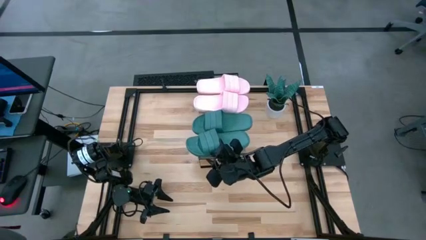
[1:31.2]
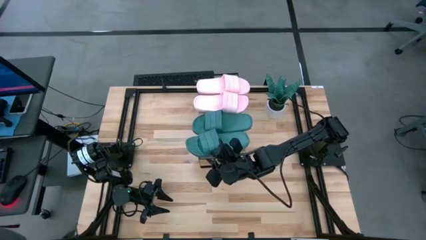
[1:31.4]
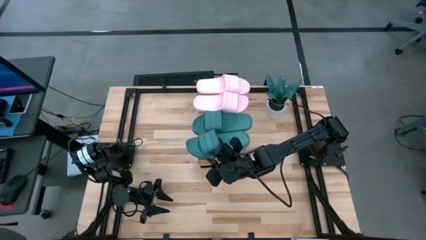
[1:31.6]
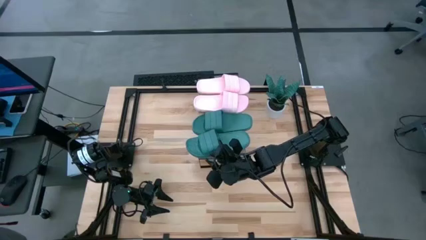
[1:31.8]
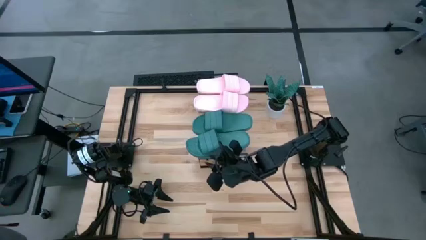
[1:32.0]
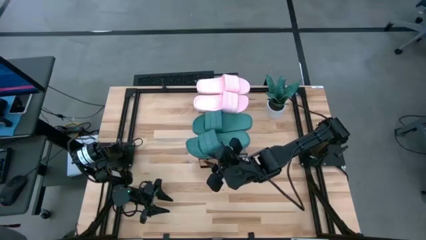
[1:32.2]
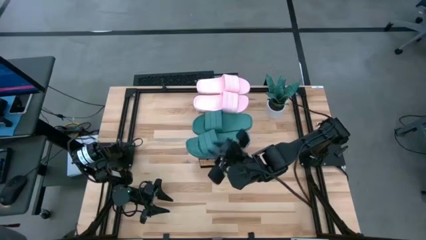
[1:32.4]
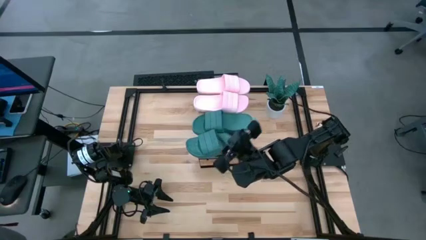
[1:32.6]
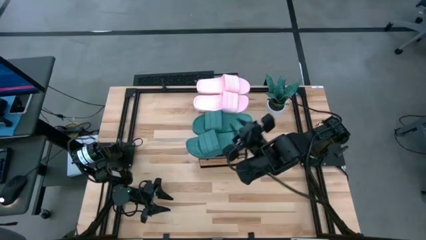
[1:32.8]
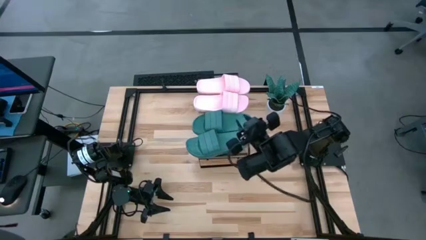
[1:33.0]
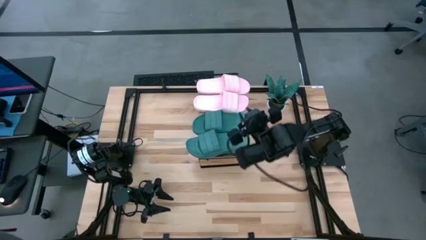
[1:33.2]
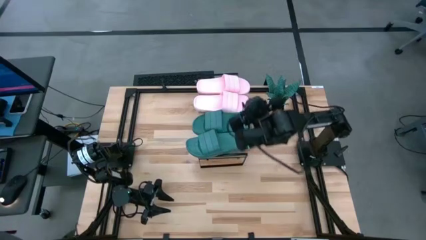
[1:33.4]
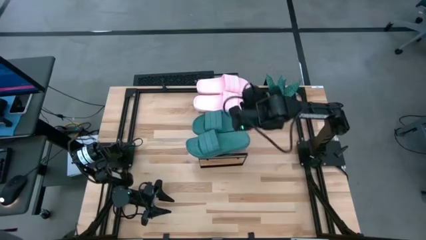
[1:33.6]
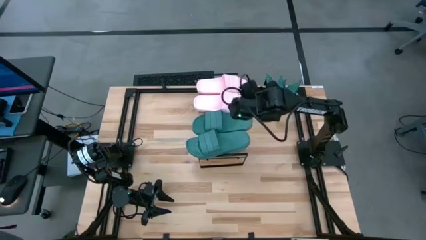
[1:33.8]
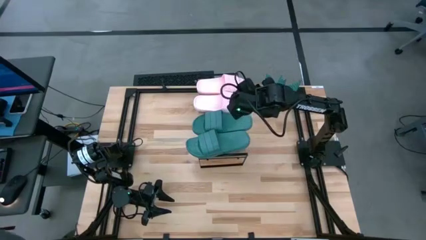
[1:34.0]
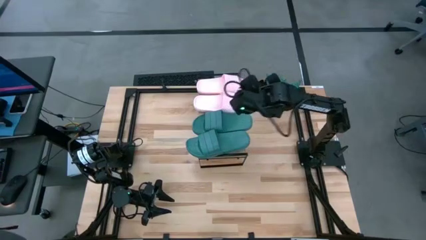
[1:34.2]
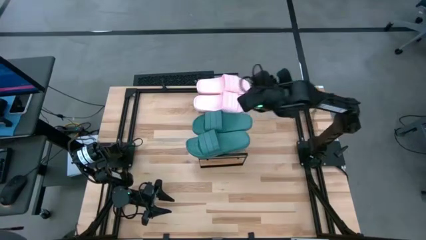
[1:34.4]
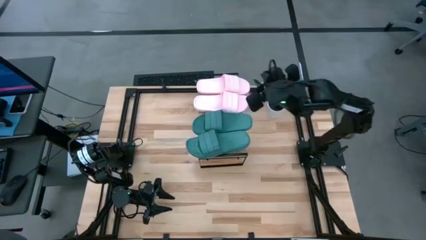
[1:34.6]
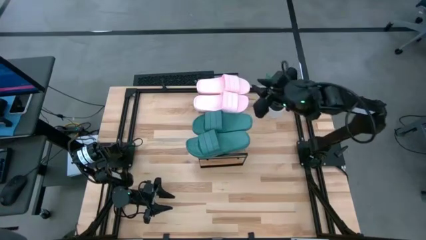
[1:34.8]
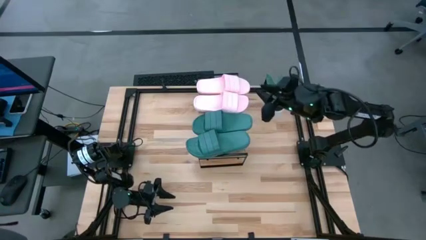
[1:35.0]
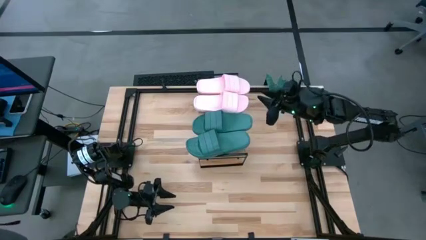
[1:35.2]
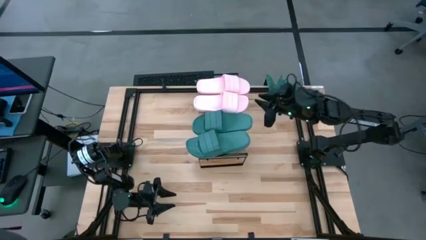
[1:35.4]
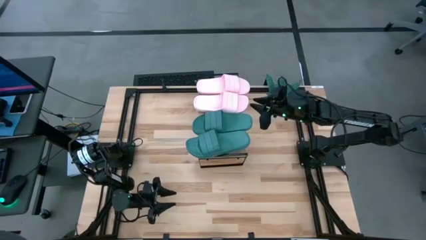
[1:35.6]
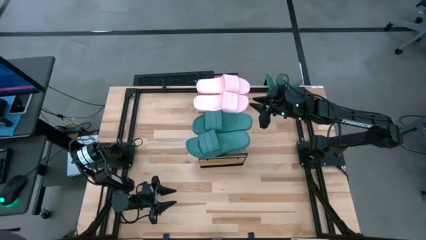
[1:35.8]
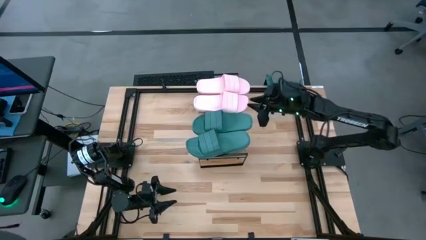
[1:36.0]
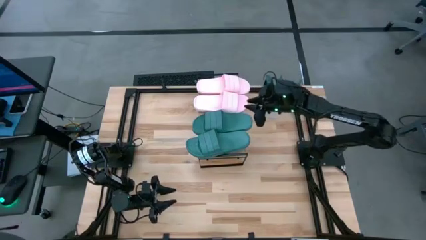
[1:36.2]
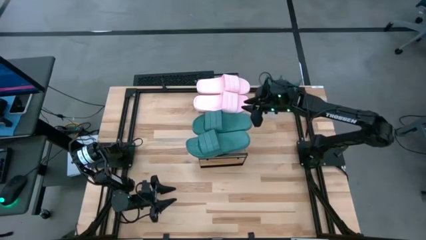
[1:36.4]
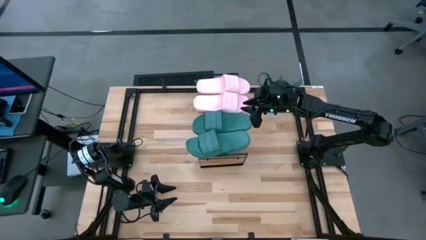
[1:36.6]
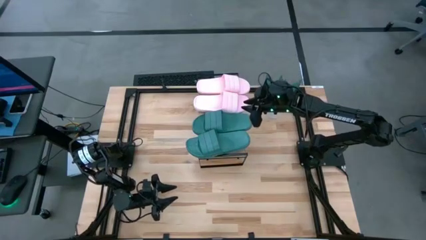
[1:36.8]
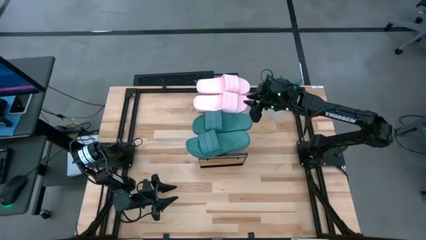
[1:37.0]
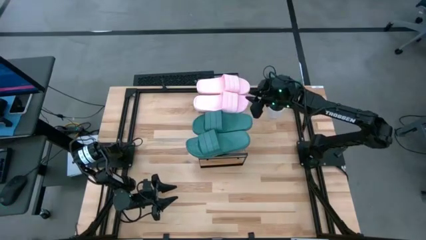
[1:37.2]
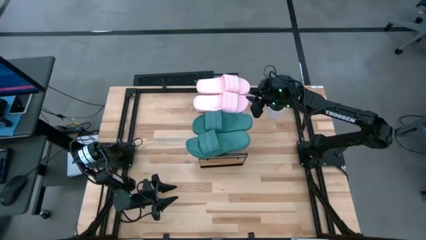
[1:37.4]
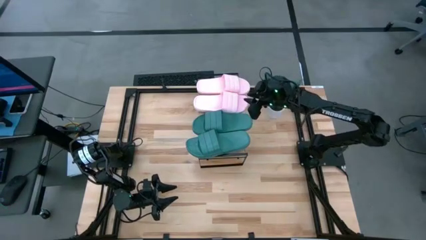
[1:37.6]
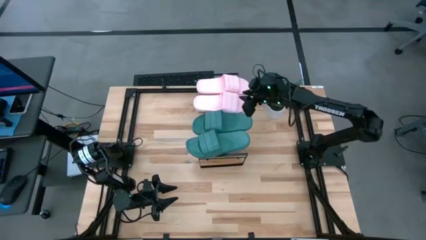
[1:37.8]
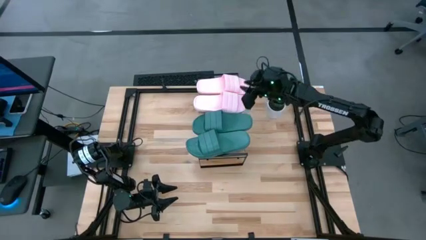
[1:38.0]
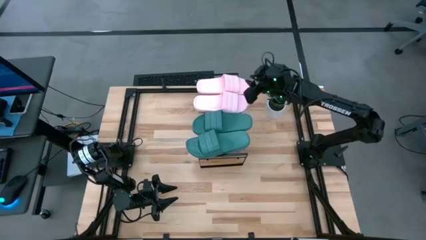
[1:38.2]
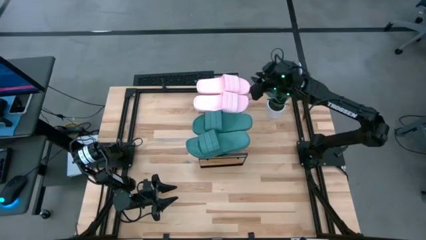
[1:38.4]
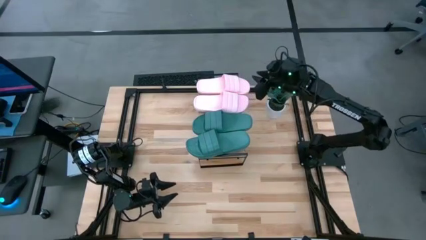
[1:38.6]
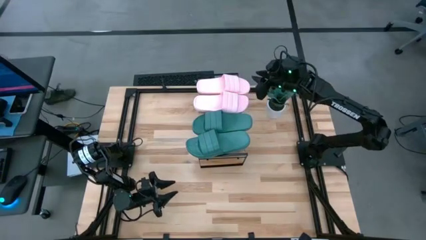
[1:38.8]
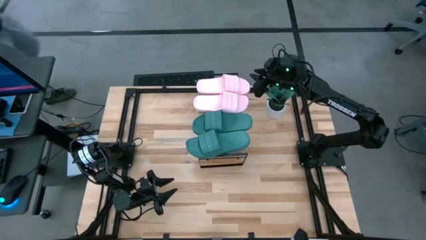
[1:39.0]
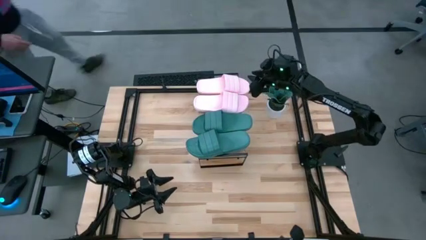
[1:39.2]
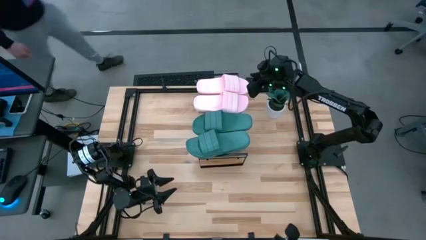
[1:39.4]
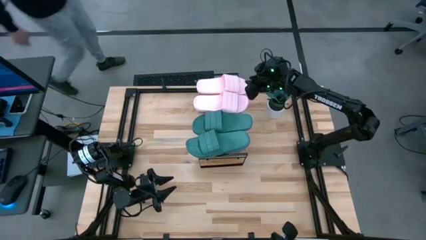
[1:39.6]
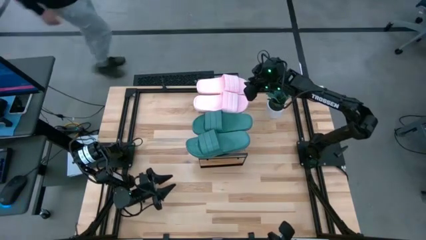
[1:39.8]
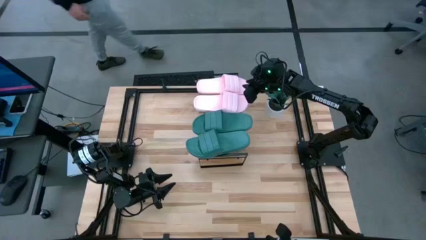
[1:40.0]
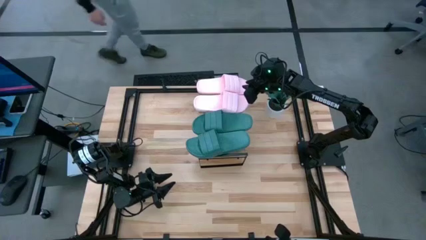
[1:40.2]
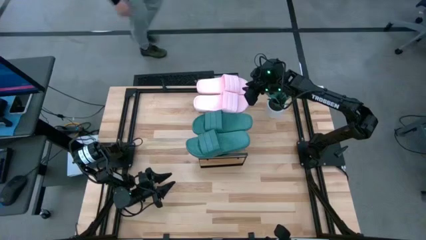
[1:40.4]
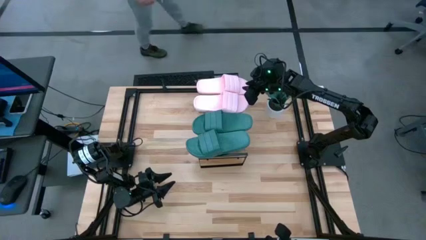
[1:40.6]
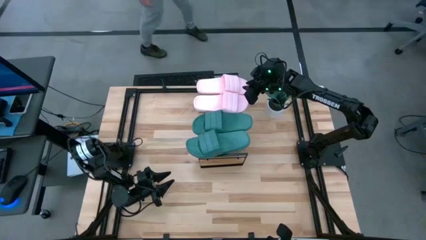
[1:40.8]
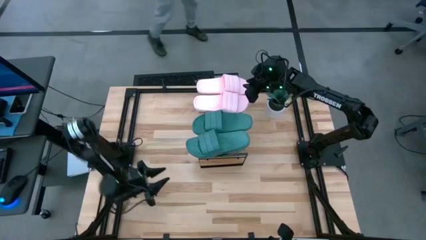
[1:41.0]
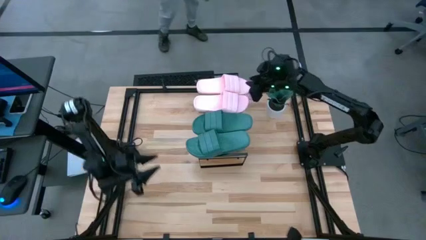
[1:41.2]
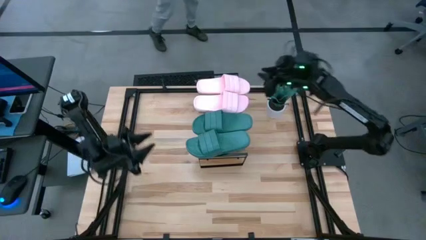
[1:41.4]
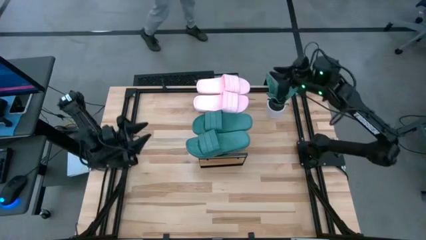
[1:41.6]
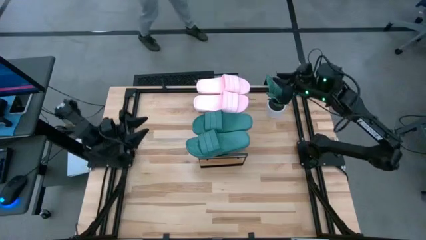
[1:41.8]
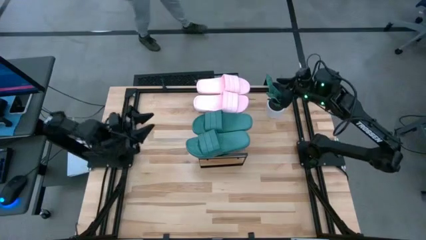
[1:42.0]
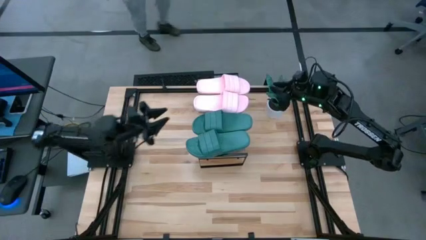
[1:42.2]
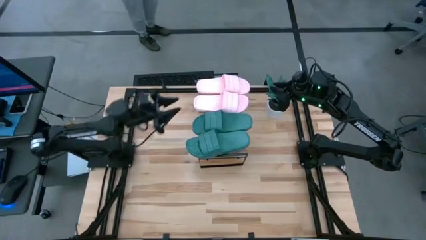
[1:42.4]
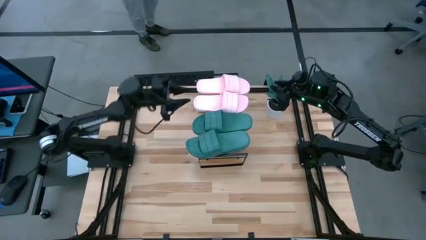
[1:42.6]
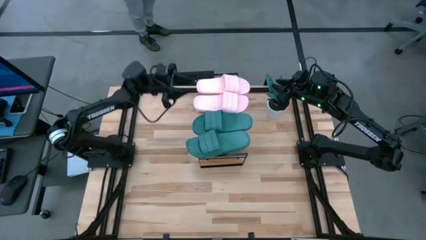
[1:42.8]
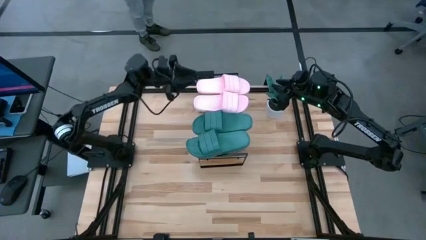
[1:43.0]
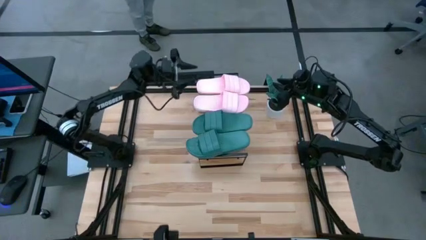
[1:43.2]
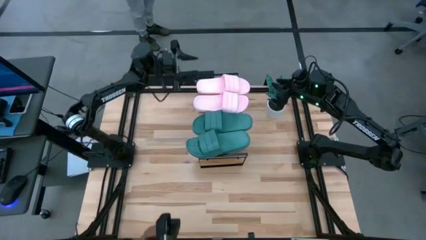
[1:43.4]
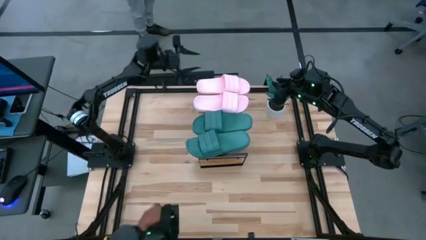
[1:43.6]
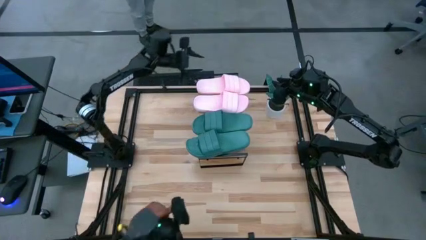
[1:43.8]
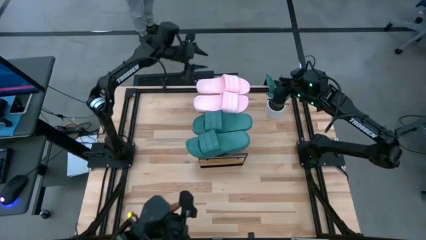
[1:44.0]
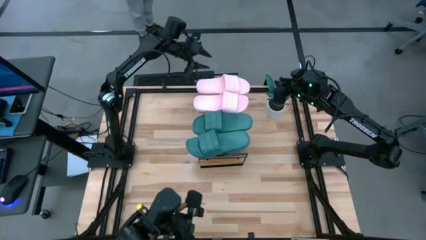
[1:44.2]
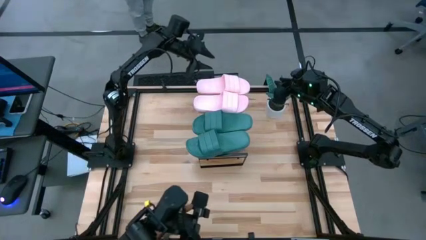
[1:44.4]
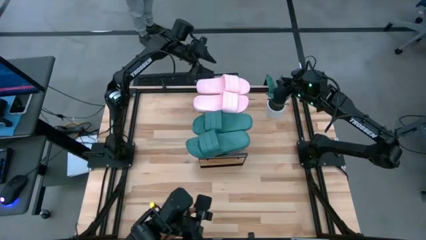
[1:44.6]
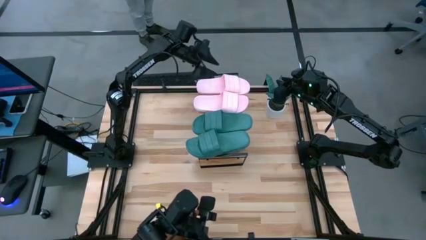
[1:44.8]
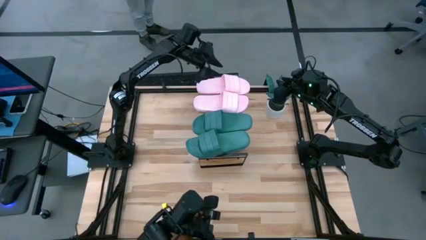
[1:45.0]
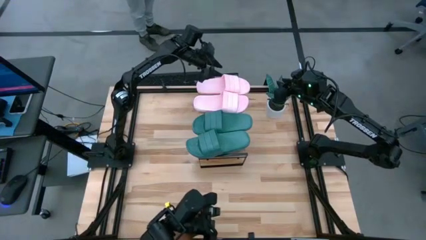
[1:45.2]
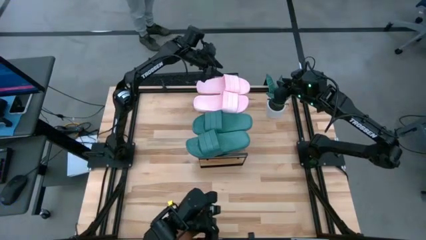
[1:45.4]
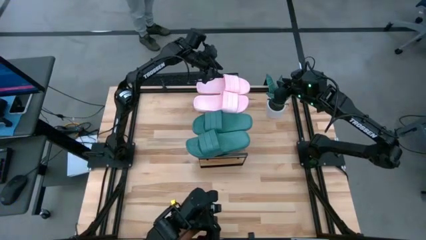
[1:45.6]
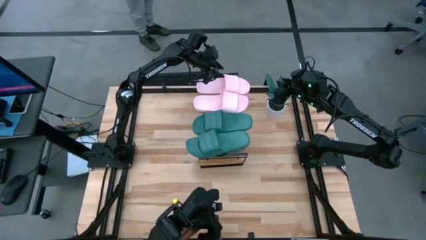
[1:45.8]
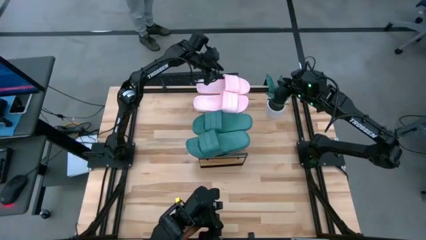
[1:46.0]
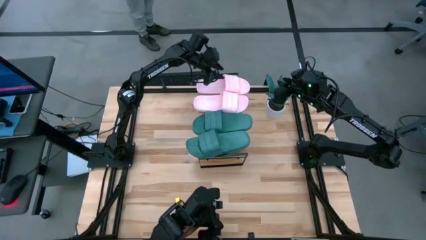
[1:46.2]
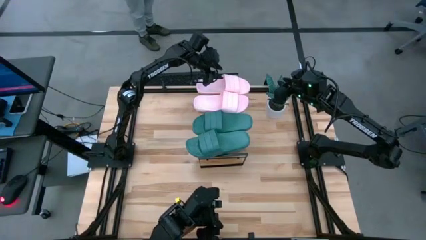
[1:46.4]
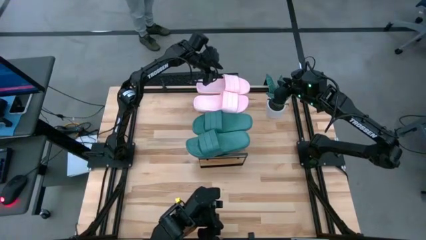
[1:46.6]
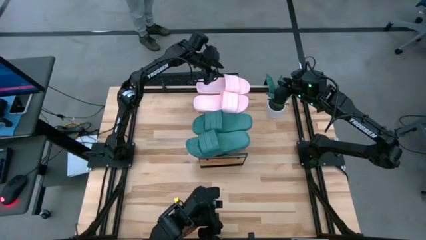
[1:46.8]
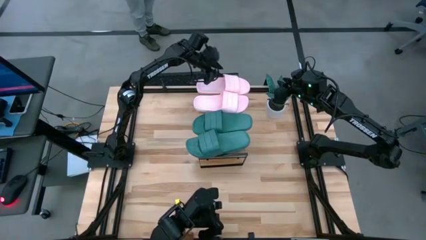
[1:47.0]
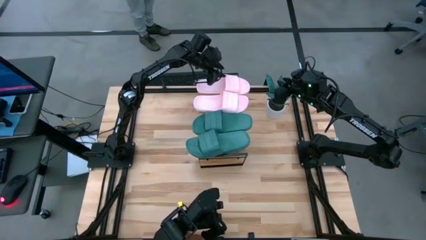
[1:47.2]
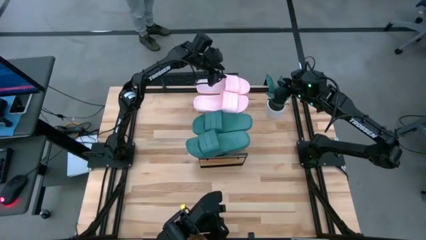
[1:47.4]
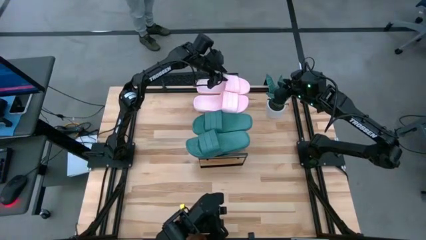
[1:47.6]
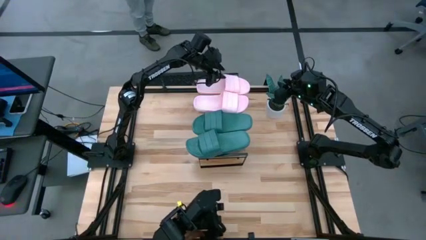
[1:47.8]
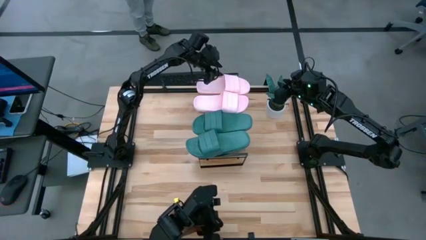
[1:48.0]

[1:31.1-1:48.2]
Task: Pick and place slides into the shelf
Adjust the slides on the shelf
